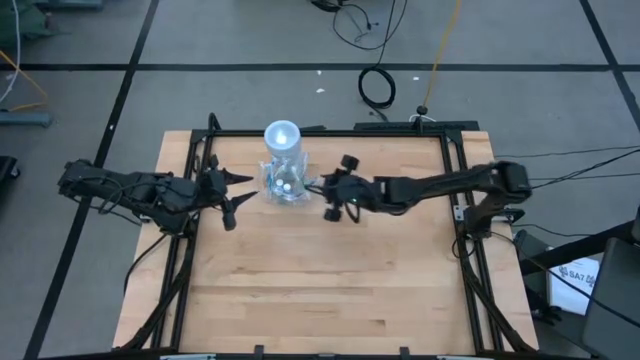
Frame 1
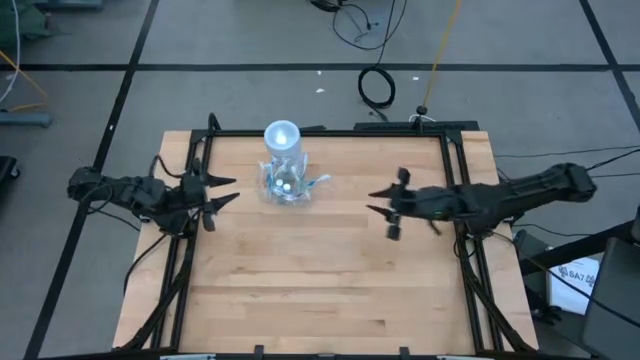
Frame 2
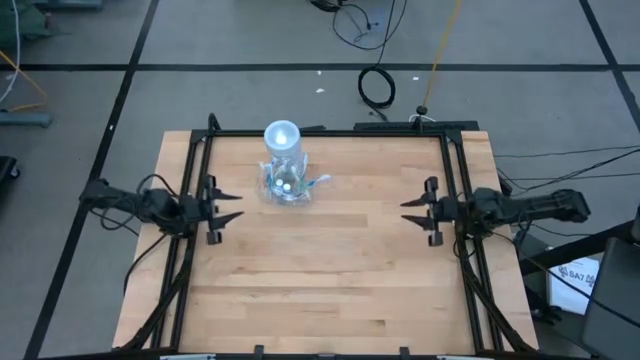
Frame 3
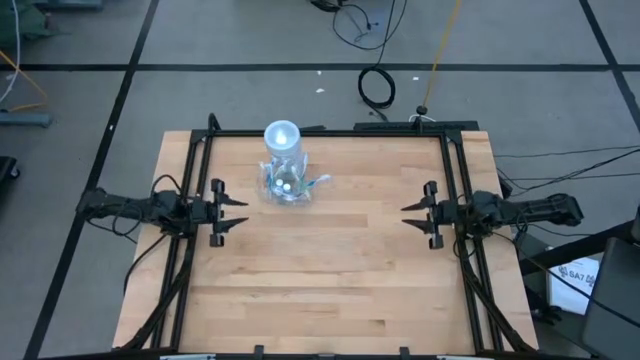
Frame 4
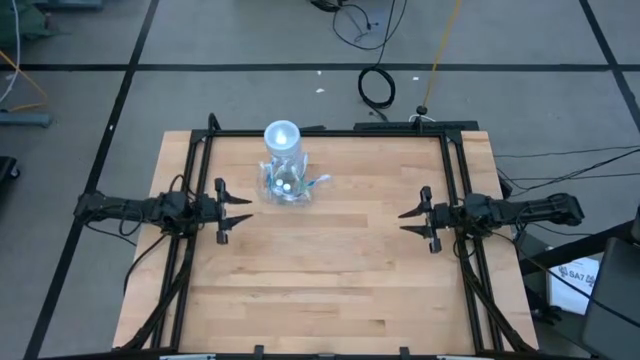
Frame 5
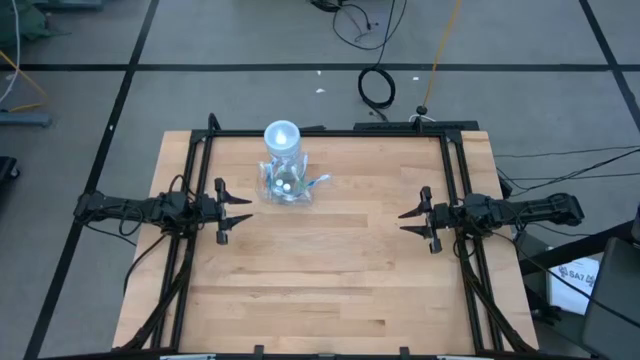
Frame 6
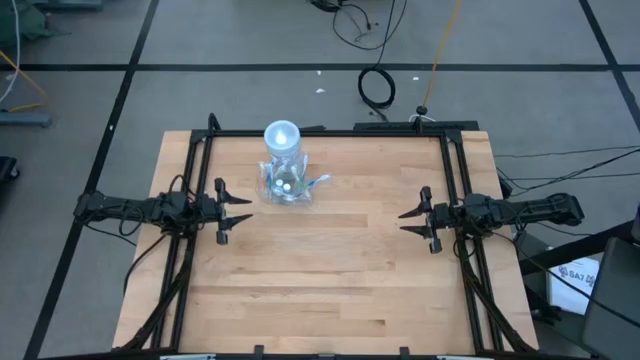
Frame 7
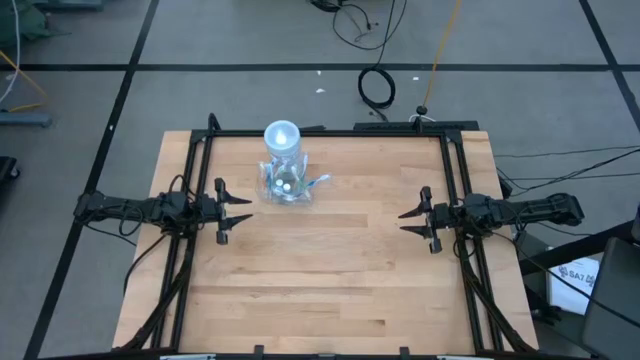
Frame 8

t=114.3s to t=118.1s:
Task: Pick & Place toothbrushing station
Return to Home Position

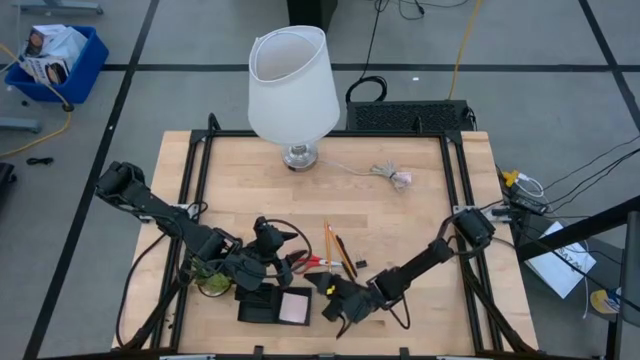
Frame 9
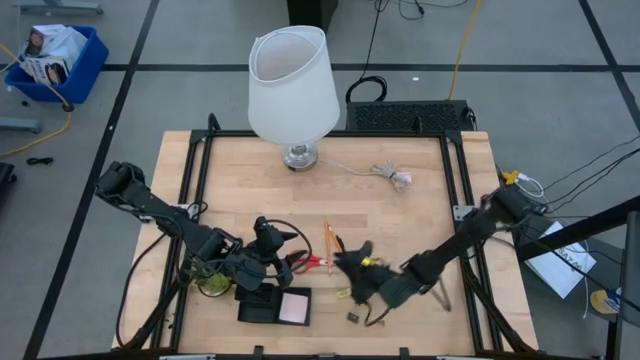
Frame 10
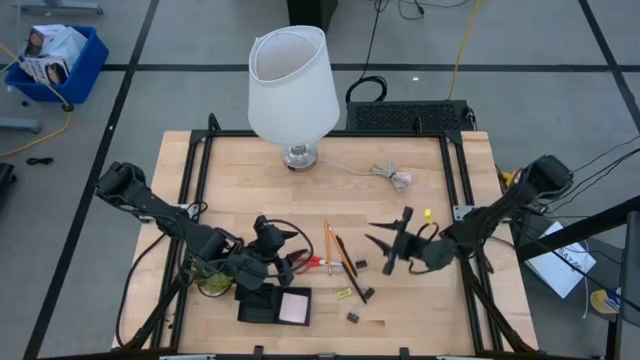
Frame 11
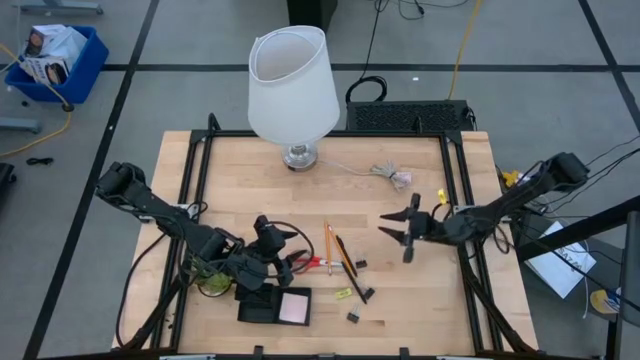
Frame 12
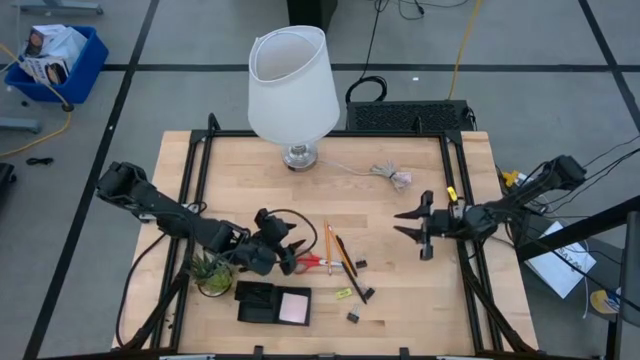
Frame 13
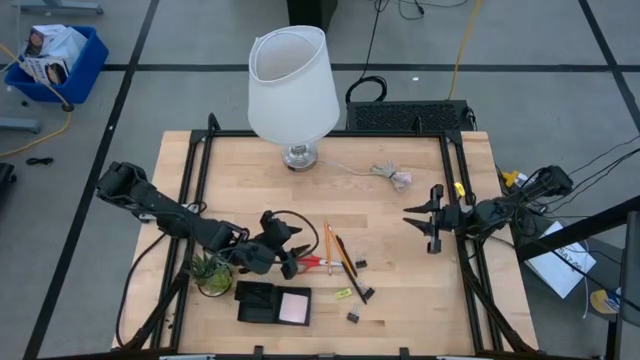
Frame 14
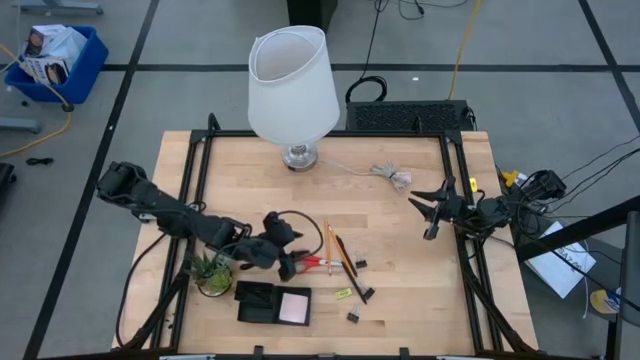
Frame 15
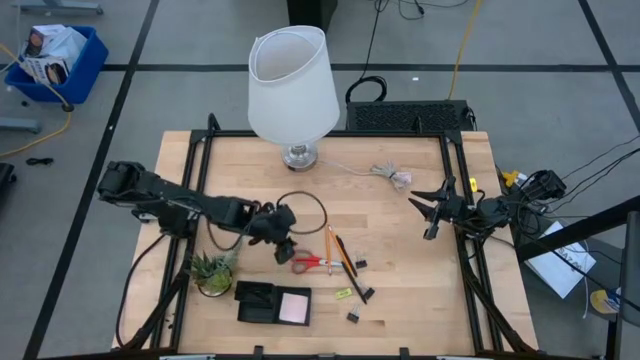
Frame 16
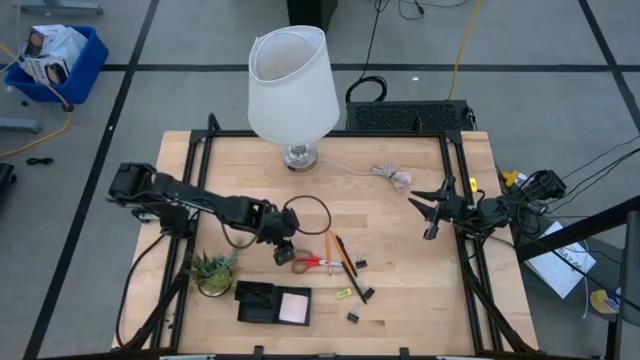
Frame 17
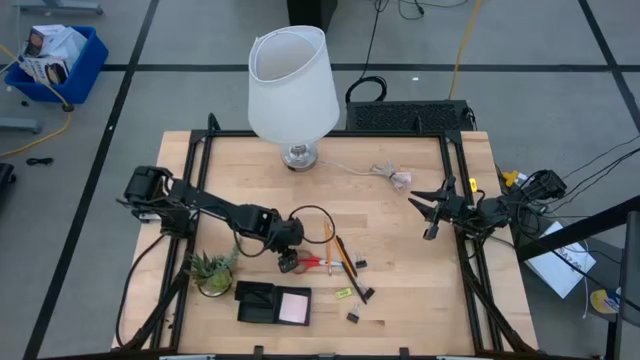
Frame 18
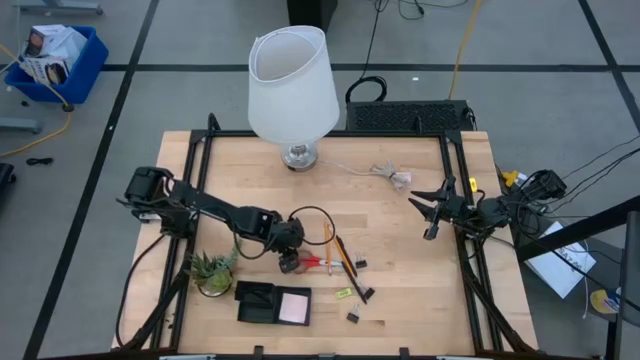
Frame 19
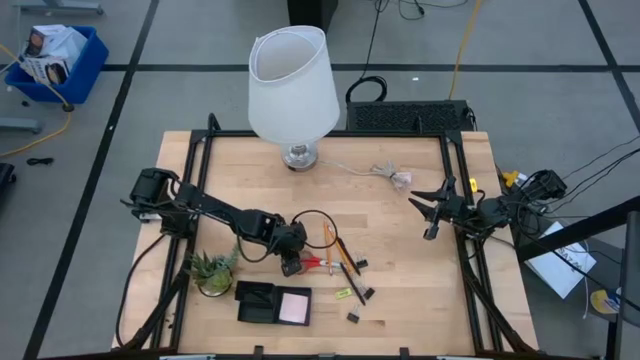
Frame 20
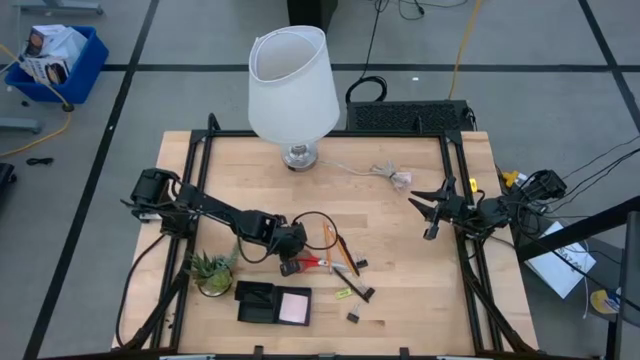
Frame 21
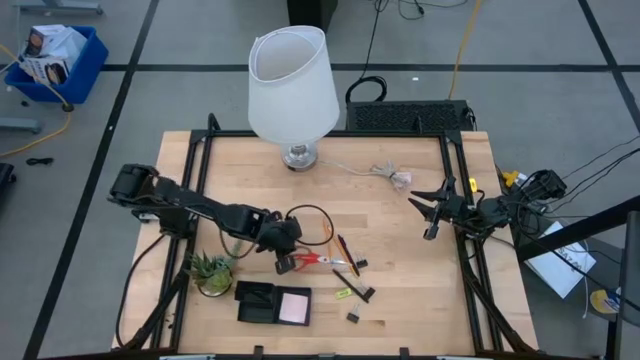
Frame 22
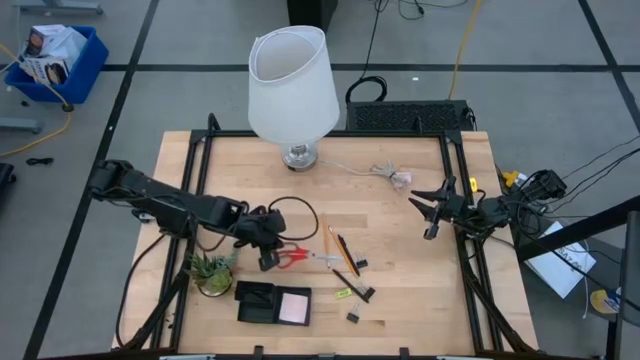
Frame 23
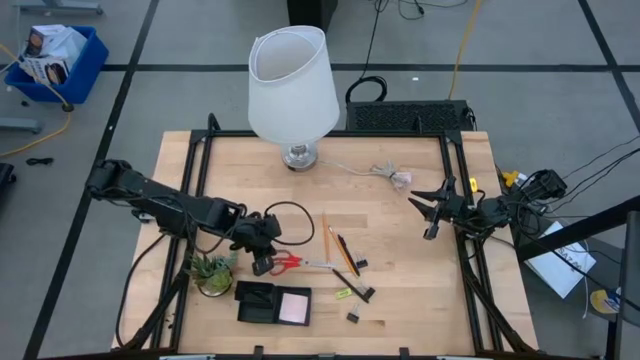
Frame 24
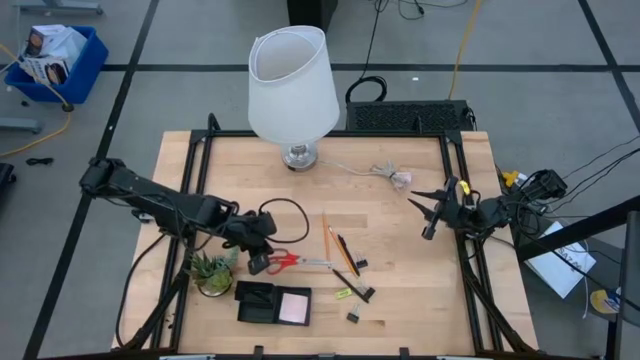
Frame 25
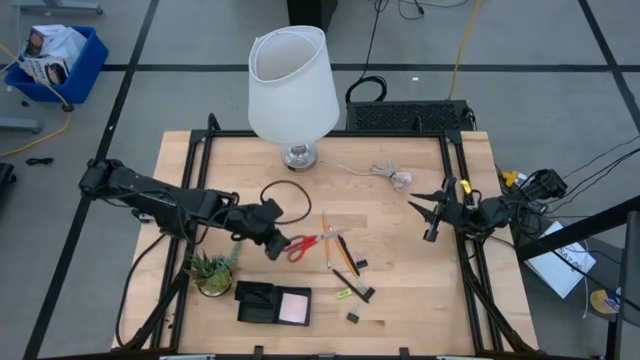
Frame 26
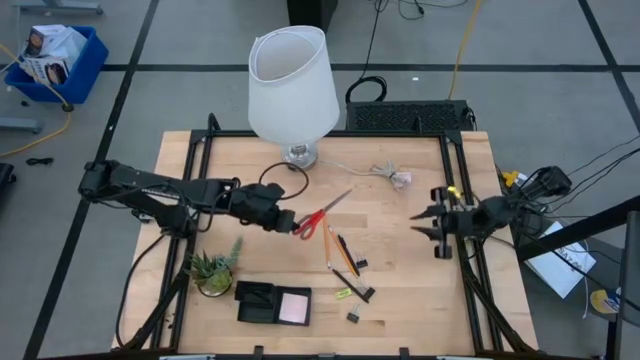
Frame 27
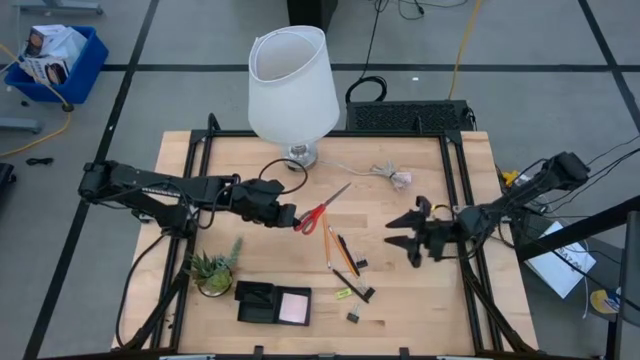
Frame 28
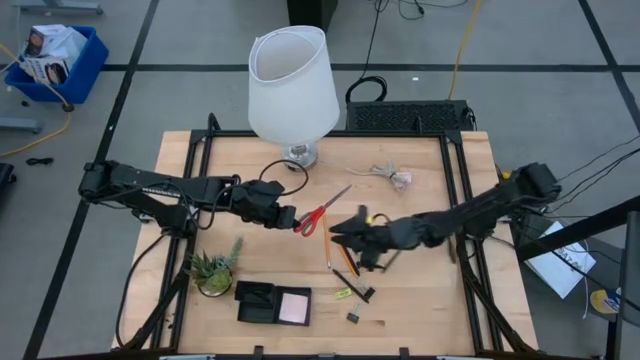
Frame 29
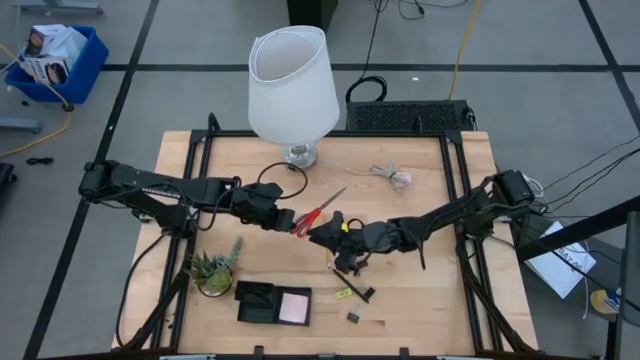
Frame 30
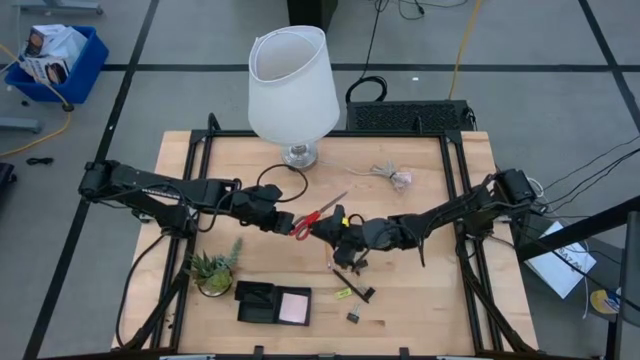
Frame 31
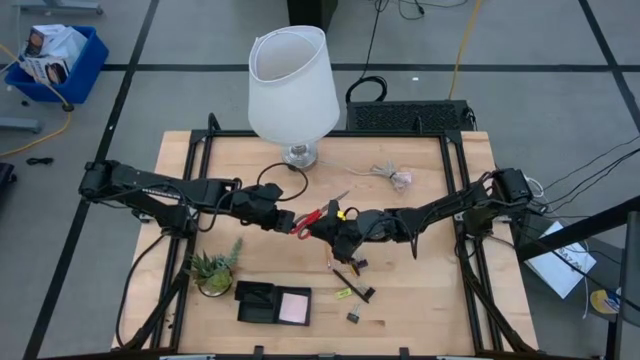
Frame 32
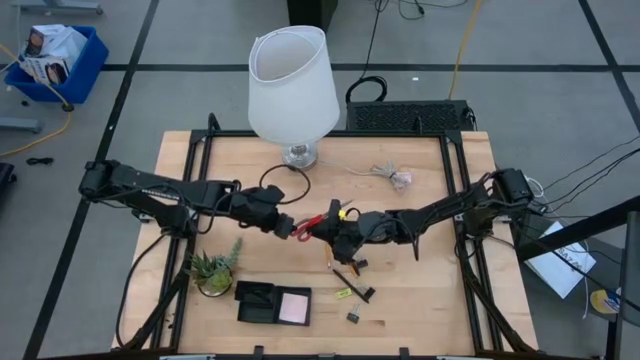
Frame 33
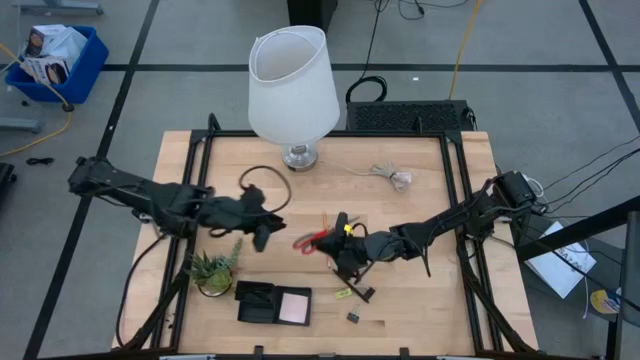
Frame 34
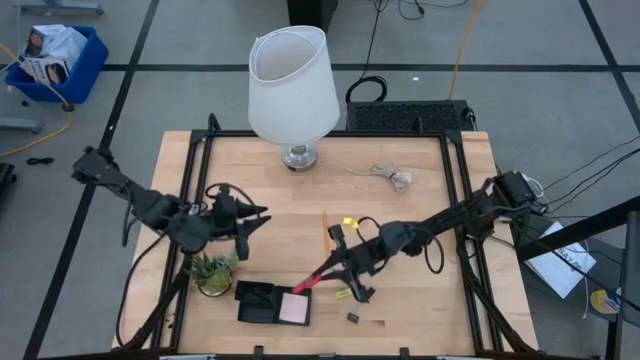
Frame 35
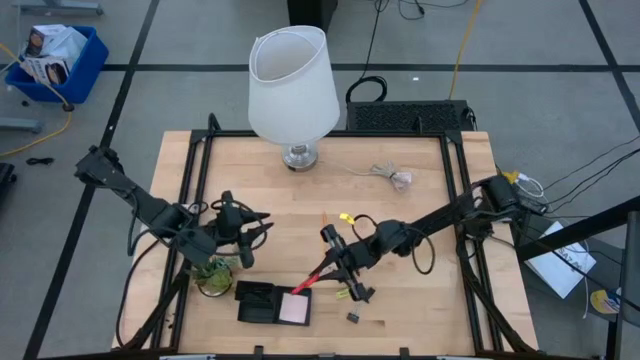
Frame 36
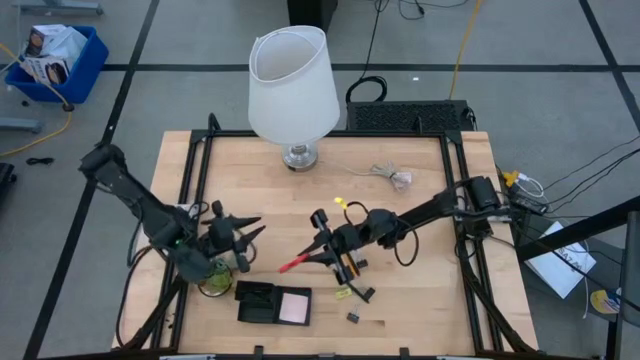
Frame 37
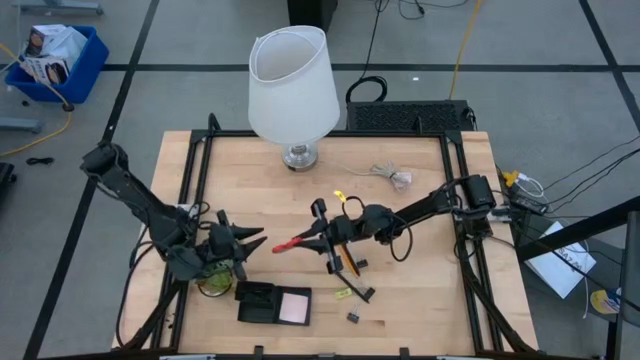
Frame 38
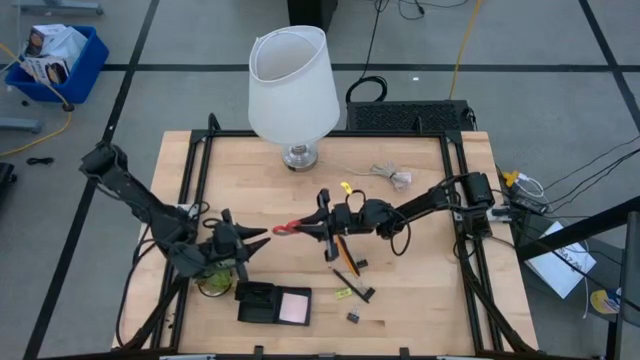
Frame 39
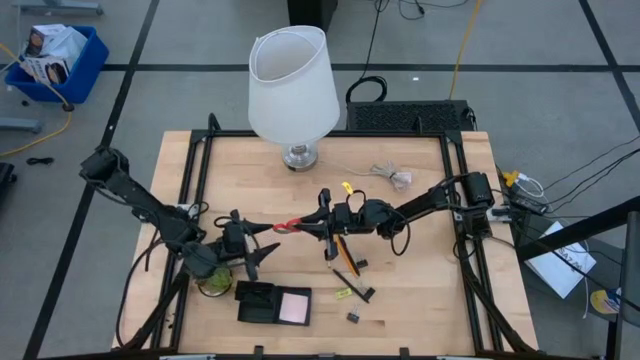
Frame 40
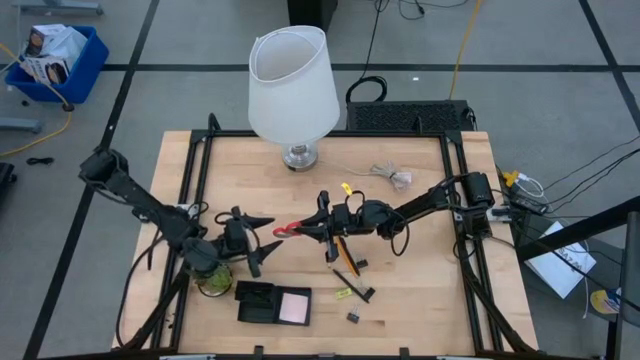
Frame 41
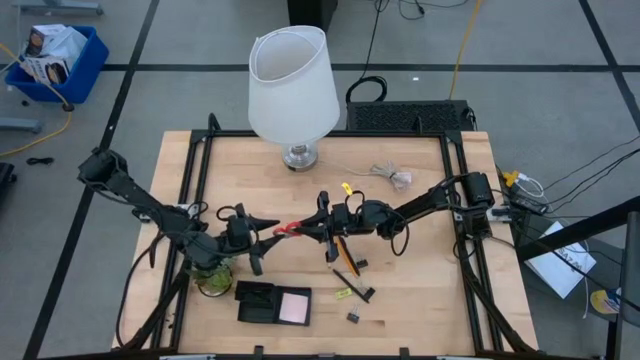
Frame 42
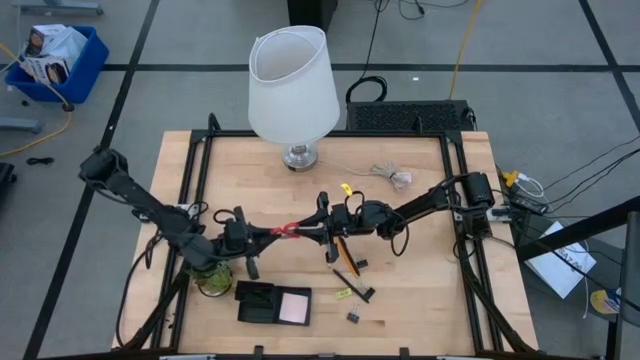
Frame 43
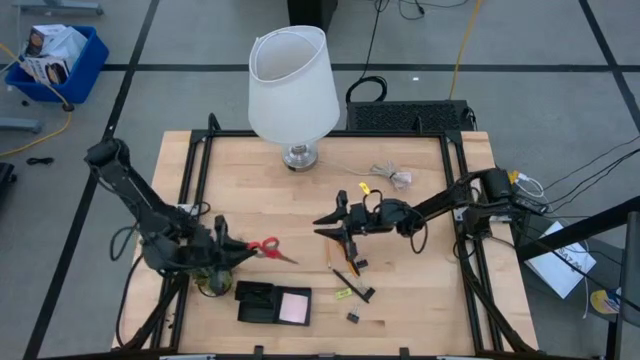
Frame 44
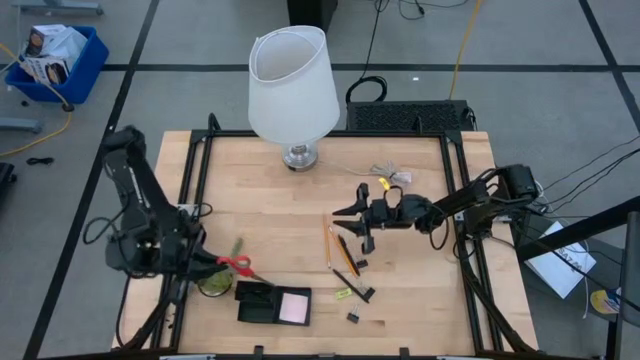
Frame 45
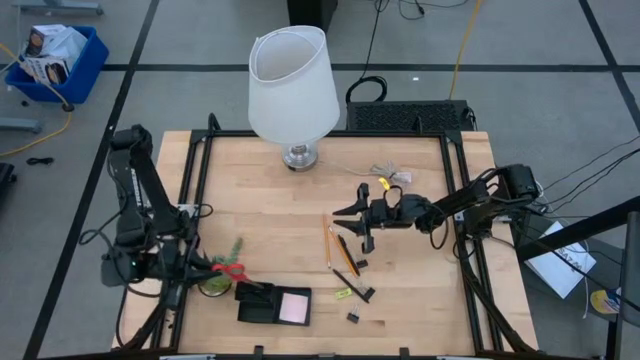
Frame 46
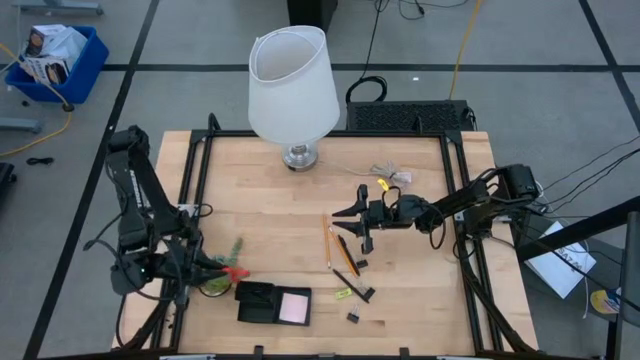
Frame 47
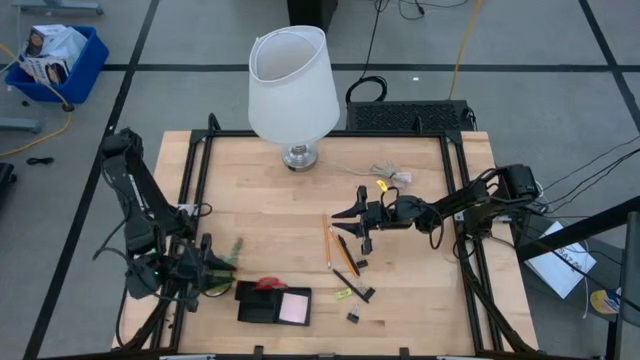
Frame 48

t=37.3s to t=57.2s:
Task: Pick and place office supplies into organizer
Put the orange scissors into the black desk organizer
